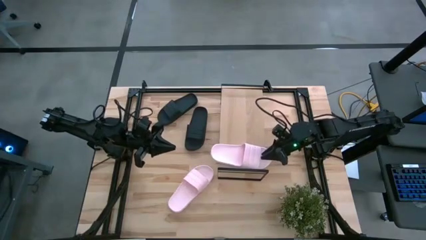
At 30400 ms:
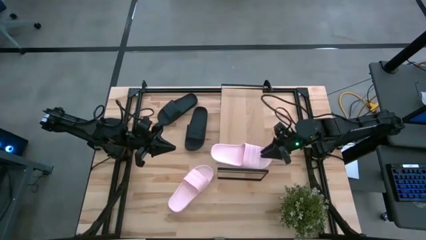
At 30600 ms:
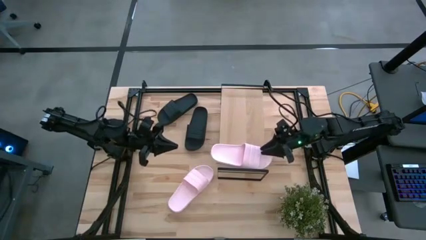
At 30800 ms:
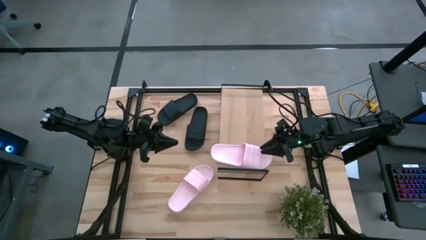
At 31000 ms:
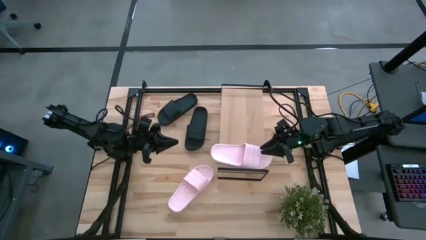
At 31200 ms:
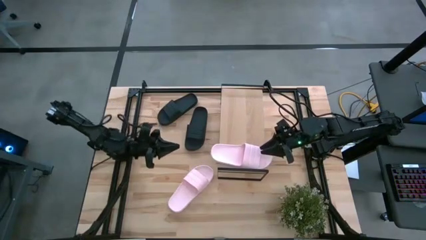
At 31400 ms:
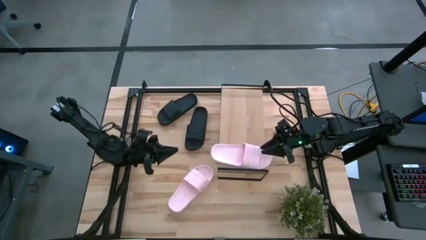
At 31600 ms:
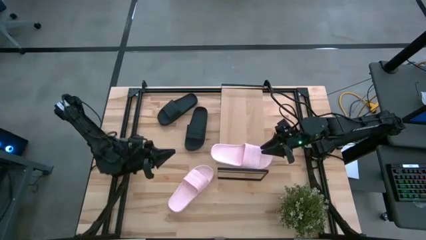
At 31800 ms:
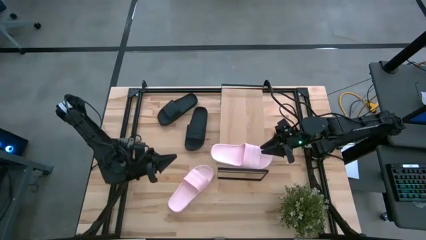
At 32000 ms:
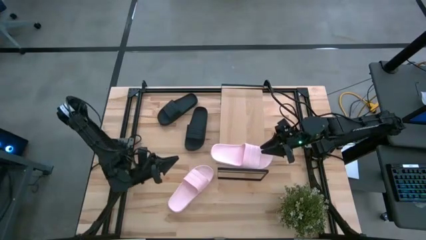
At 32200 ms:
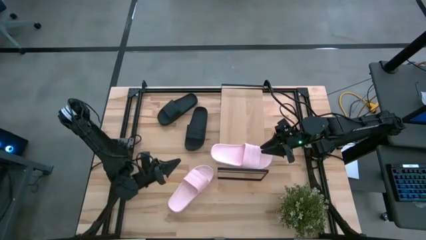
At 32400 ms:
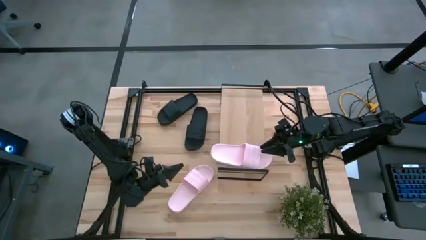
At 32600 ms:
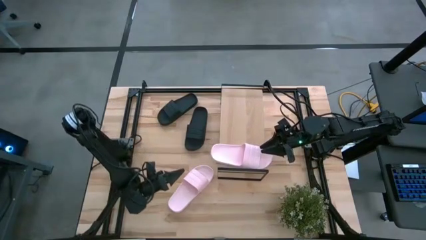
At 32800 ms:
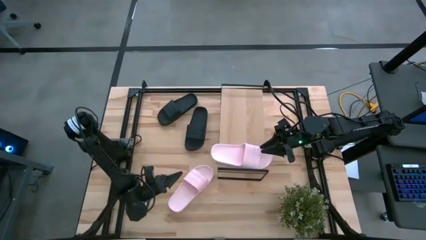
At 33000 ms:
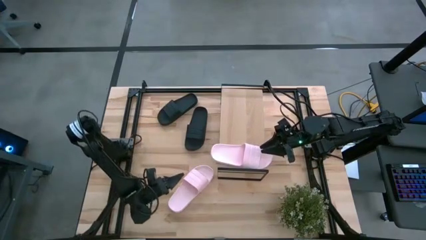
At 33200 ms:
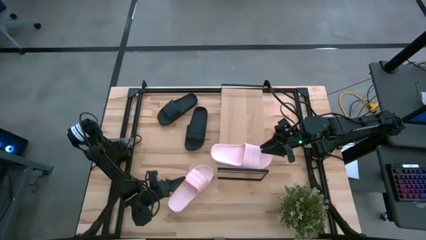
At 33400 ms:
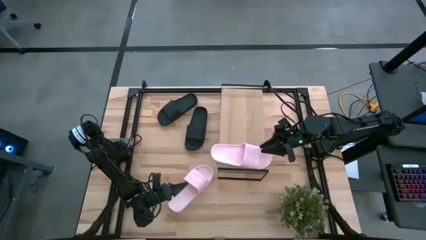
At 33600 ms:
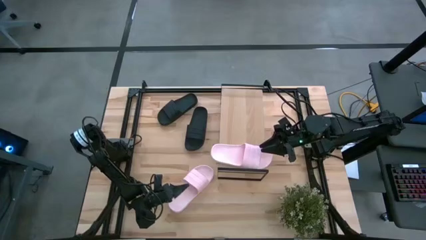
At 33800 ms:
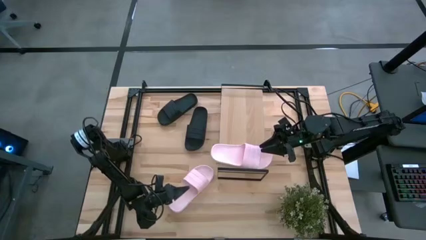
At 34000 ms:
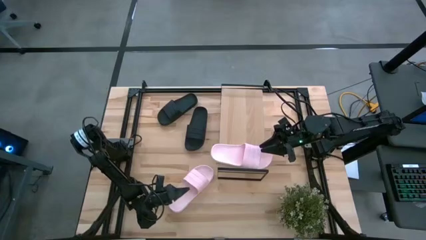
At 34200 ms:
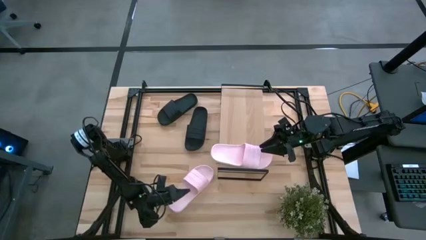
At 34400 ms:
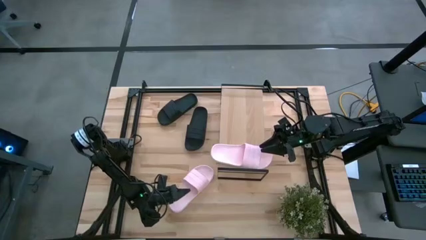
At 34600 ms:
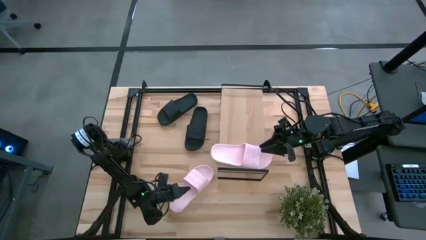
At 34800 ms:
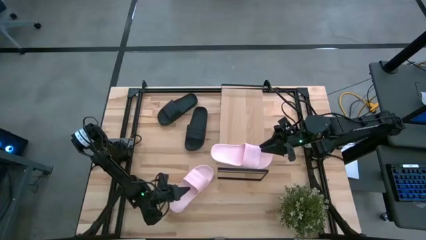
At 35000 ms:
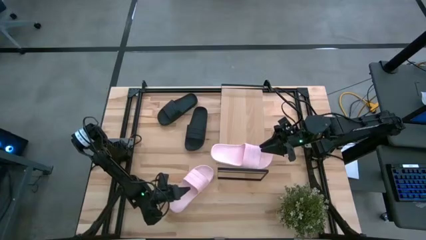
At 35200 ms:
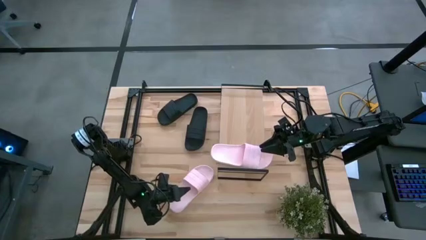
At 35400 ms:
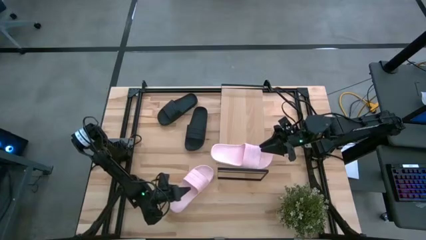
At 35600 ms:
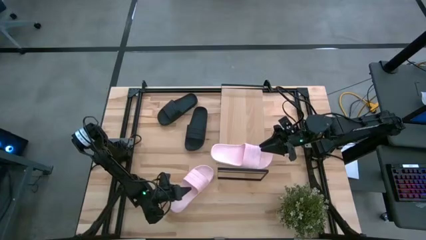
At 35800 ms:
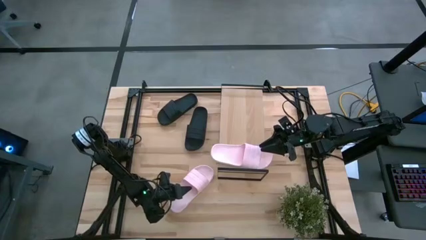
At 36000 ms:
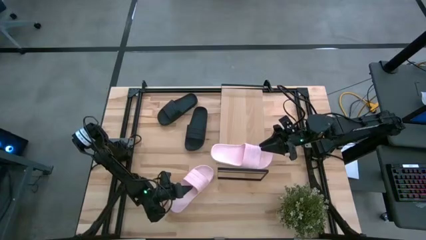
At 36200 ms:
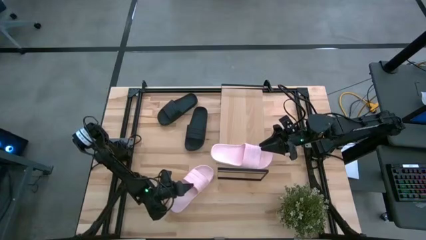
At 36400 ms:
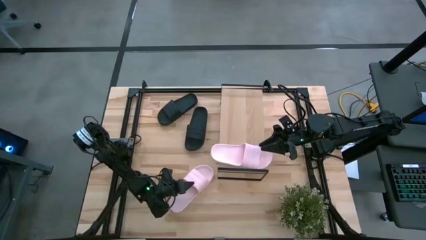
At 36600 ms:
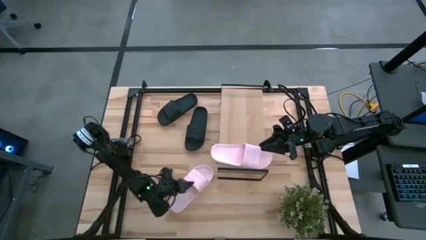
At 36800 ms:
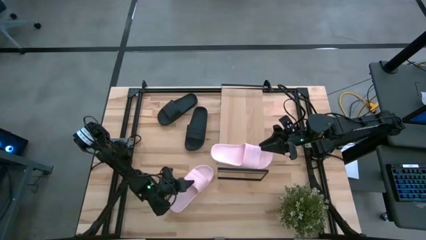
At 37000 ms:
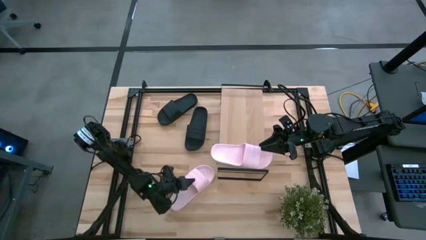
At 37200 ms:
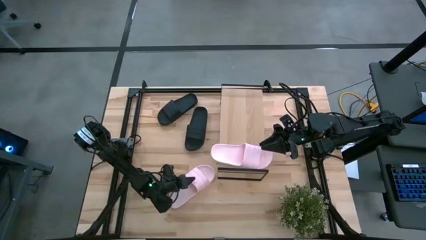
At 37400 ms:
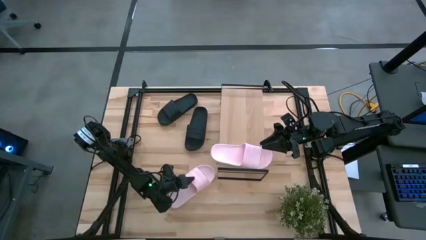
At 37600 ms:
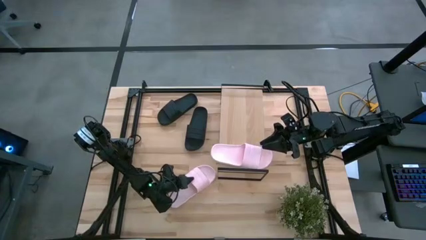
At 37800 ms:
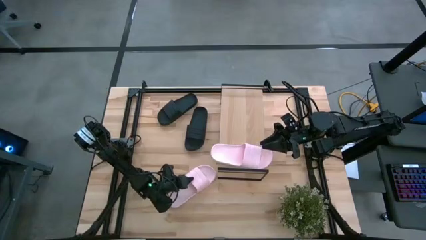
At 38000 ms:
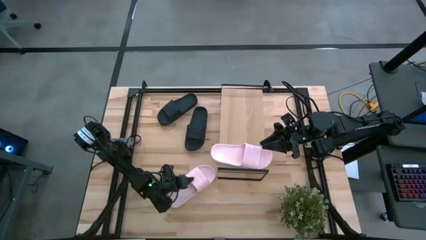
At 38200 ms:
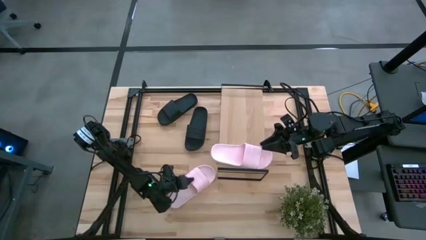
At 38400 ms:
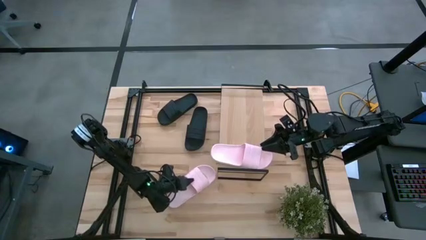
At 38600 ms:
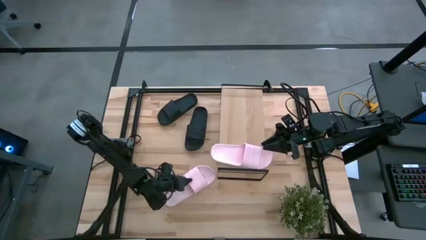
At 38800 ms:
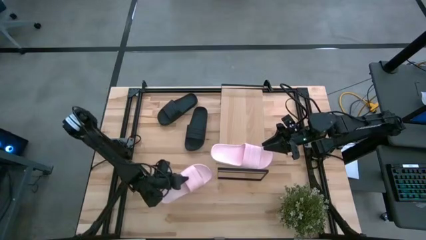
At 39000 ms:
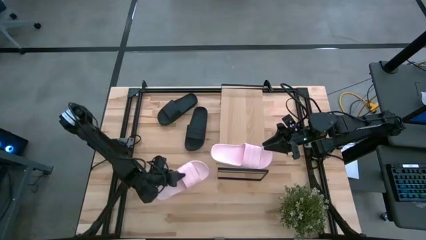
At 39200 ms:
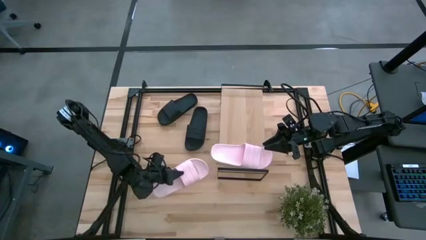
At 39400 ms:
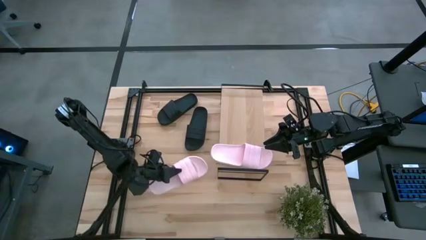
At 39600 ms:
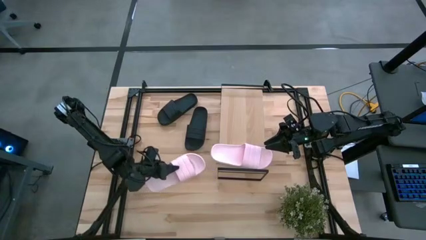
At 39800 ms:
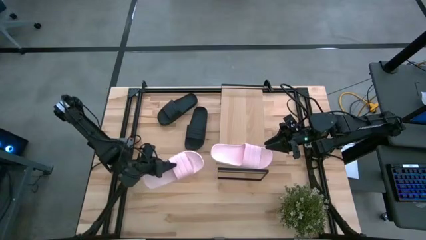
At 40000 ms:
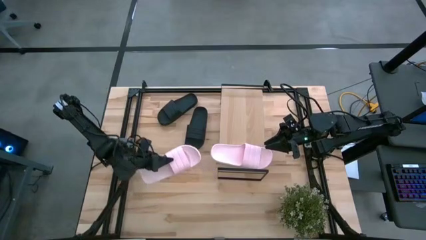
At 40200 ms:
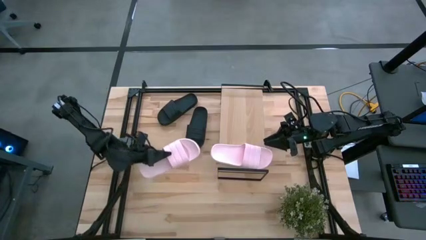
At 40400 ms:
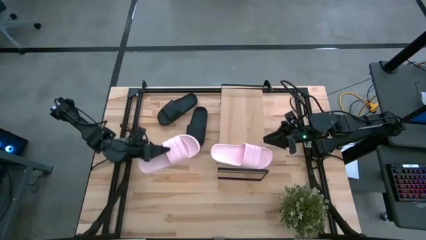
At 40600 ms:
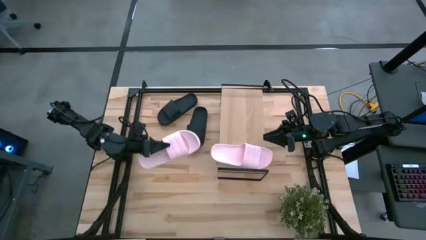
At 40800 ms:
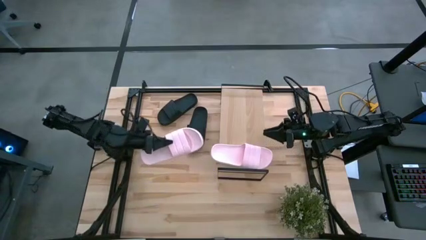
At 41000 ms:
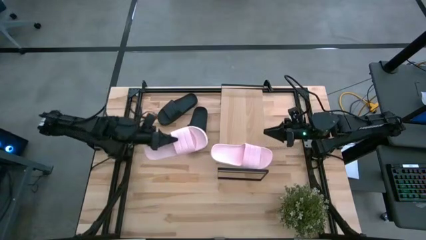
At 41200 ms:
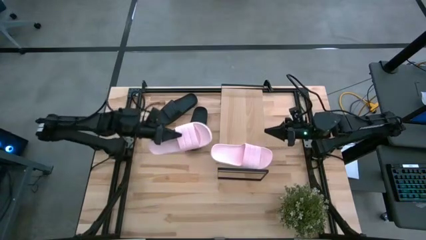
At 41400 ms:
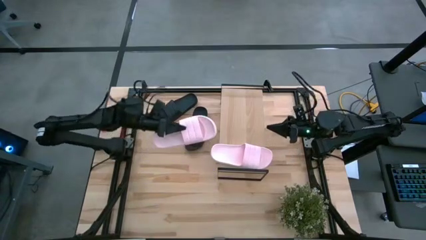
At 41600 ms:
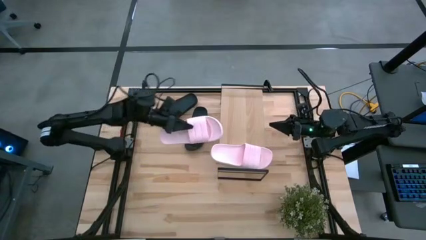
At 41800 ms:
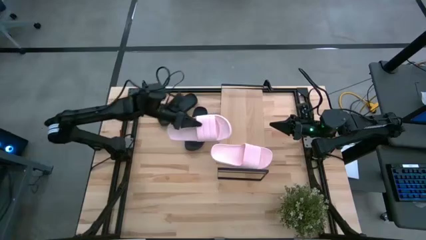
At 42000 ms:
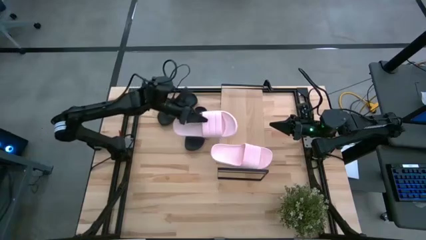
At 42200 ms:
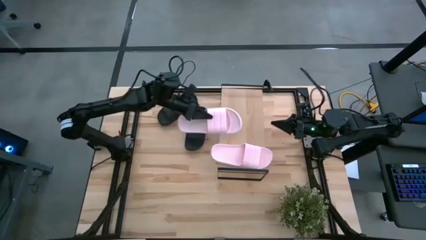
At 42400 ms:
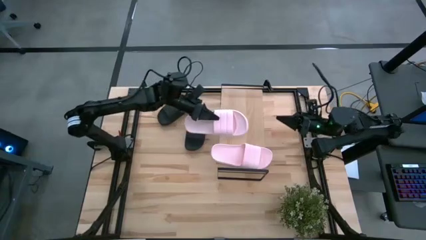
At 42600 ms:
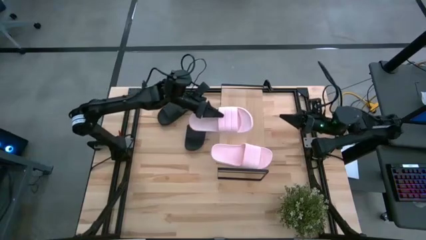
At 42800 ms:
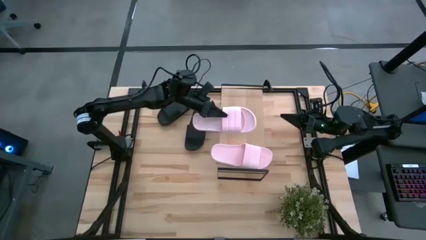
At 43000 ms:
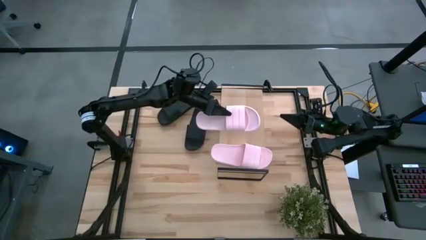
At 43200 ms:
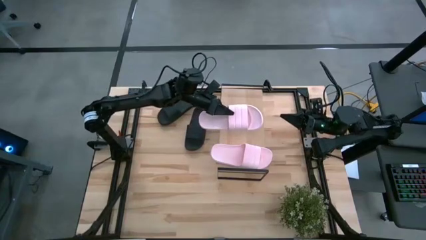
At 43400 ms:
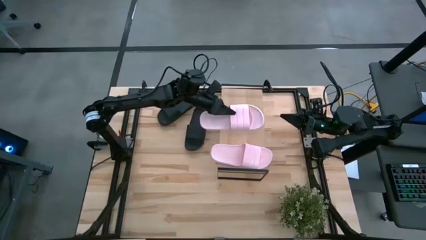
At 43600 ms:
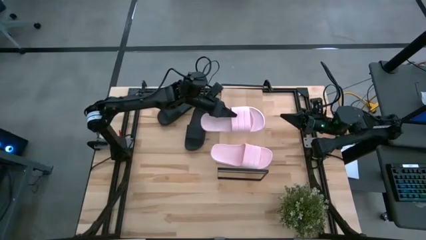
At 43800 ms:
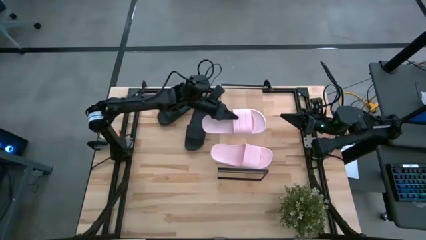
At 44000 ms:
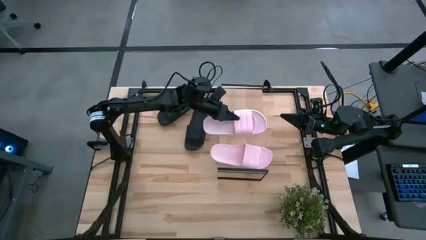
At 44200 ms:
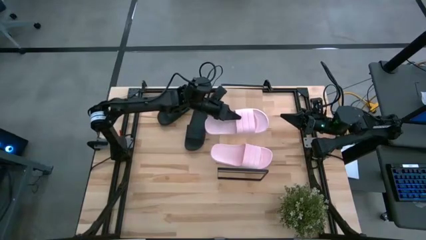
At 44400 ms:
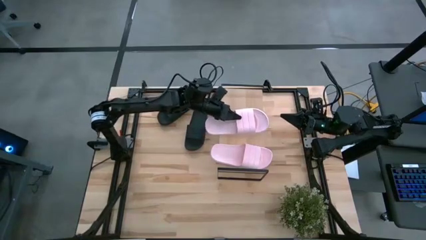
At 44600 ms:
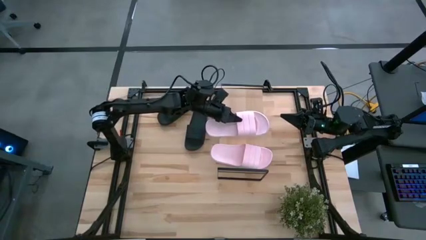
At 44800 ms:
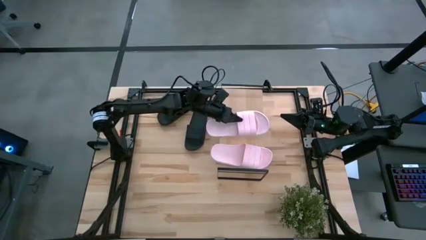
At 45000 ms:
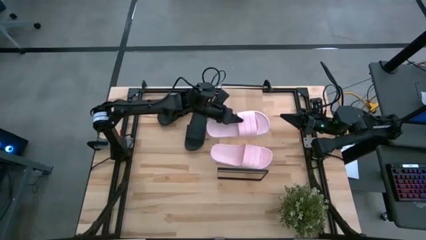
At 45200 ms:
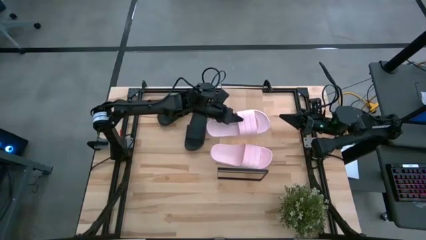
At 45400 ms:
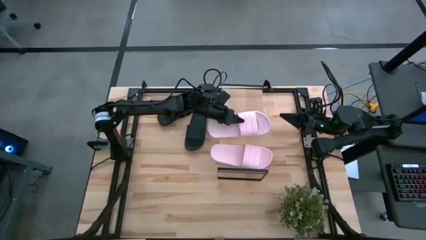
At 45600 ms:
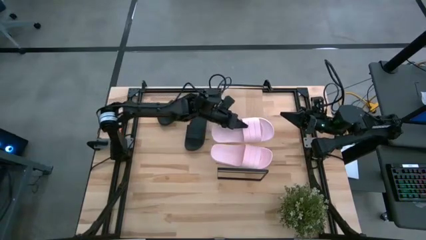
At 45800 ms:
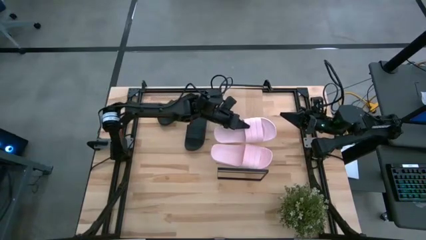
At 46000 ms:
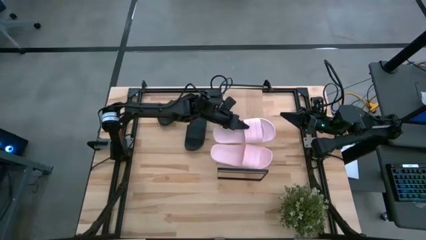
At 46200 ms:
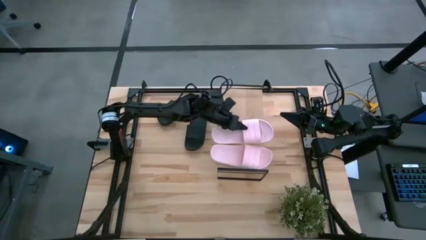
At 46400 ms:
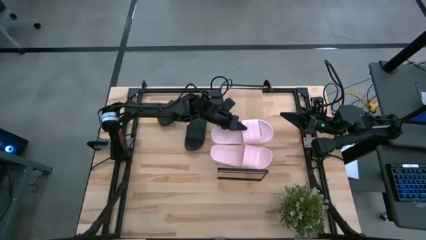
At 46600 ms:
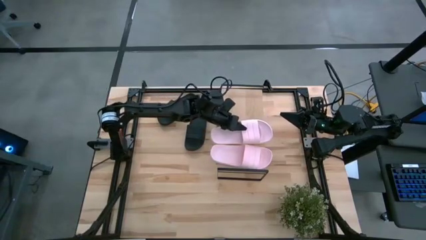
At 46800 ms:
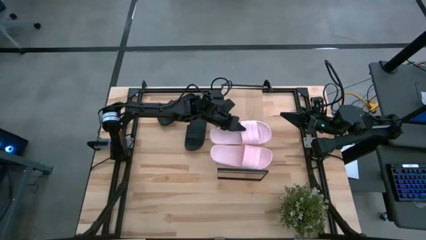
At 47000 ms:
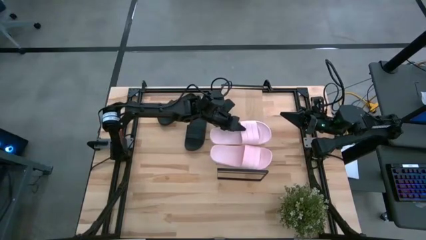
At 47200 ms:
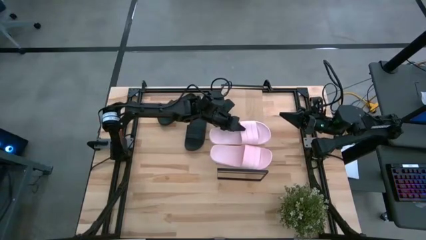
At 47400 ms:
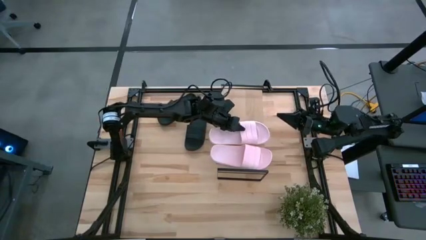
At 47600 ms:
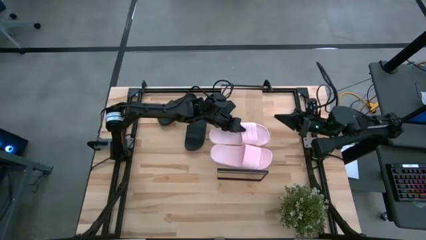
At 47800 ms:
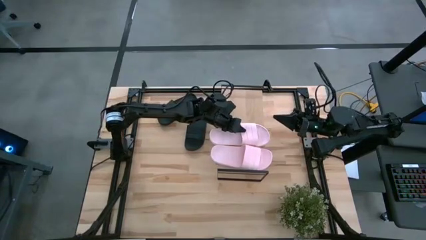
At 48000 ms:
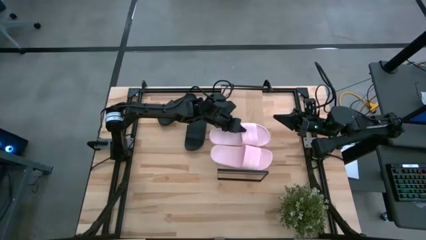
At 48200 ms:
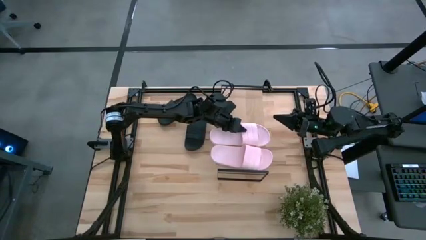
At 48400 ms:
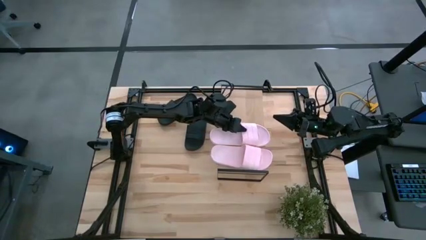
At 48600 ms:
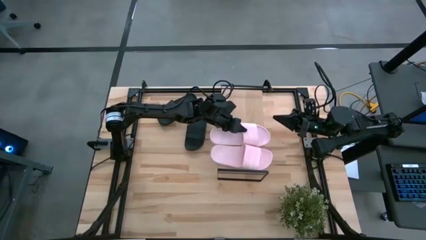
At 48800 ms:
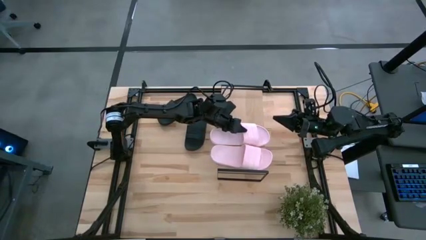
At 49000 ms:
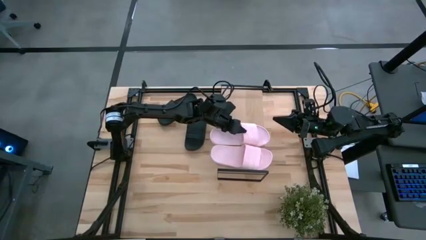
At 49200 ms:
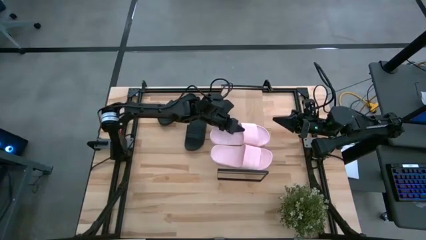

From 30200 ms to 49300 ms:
Task: Pick and place slides into the shelf
Put the light pink slipper on the shelf
